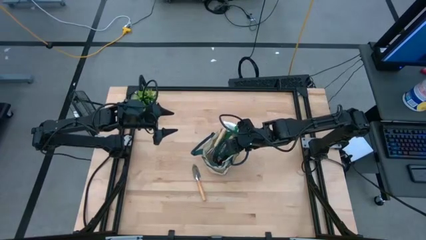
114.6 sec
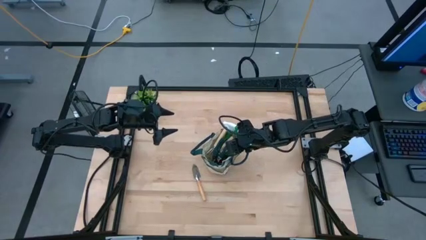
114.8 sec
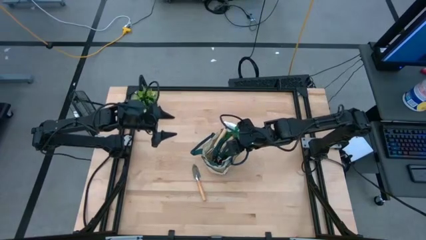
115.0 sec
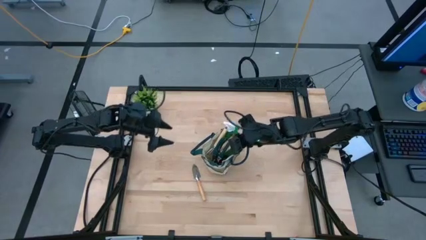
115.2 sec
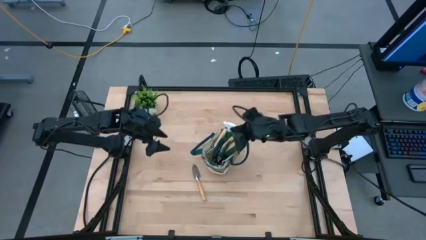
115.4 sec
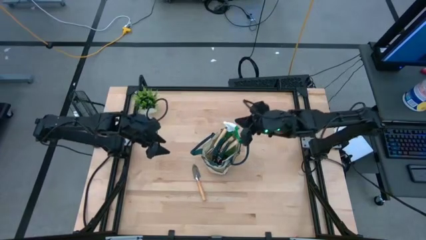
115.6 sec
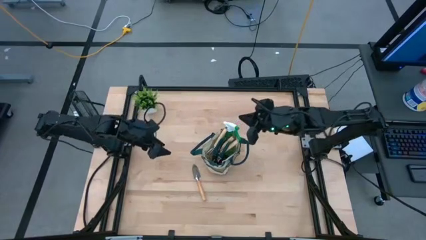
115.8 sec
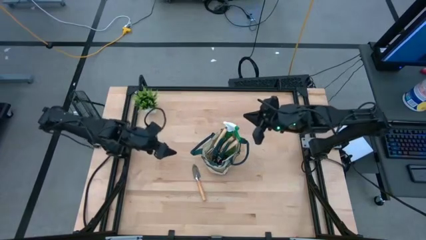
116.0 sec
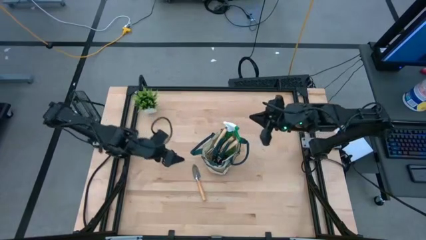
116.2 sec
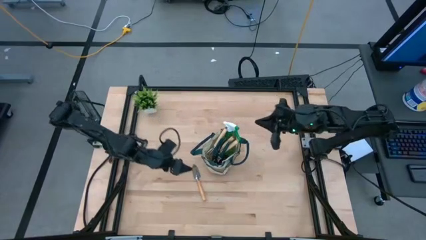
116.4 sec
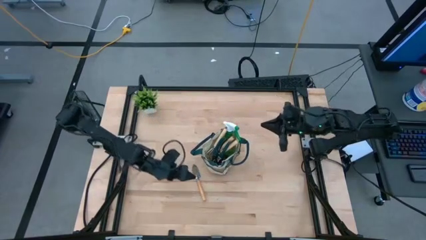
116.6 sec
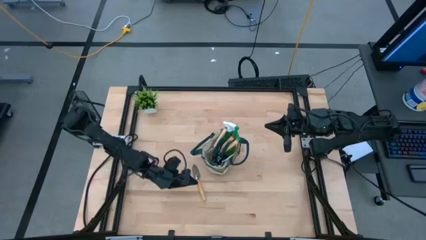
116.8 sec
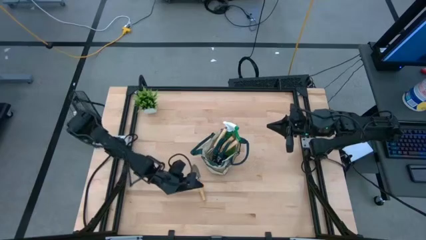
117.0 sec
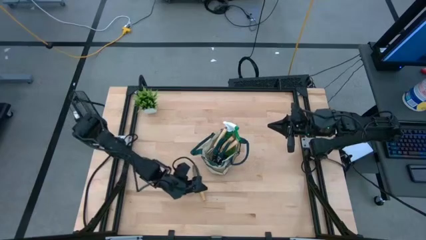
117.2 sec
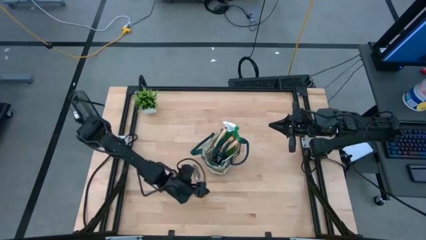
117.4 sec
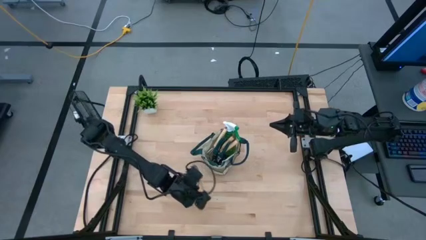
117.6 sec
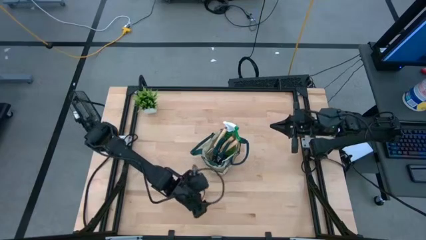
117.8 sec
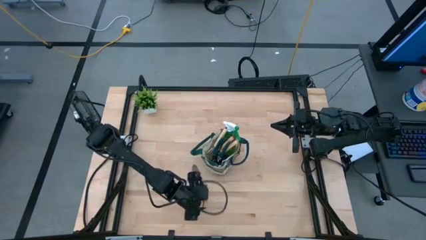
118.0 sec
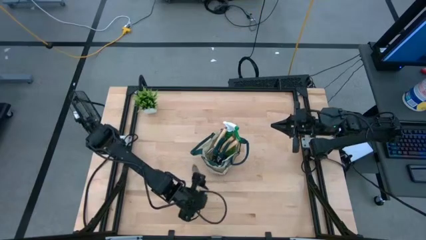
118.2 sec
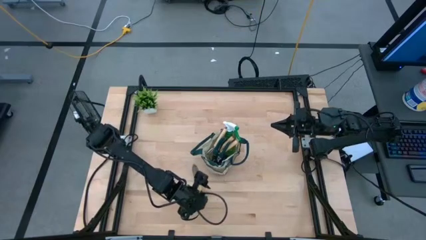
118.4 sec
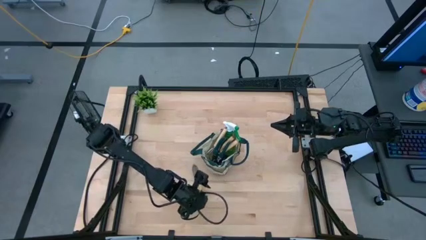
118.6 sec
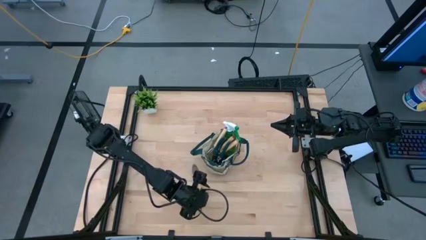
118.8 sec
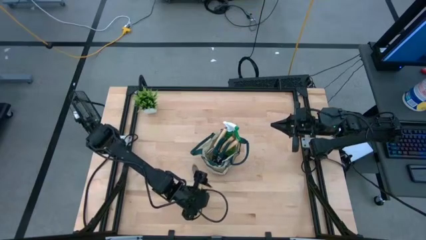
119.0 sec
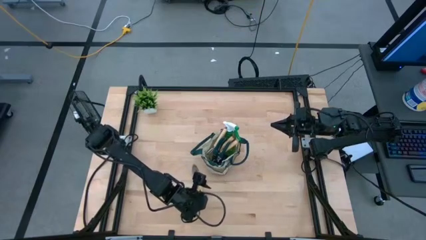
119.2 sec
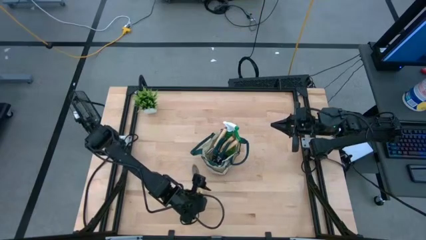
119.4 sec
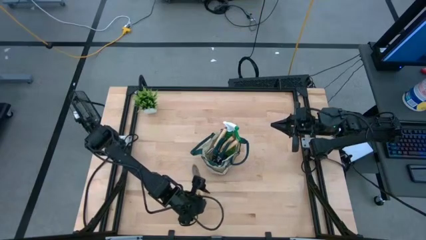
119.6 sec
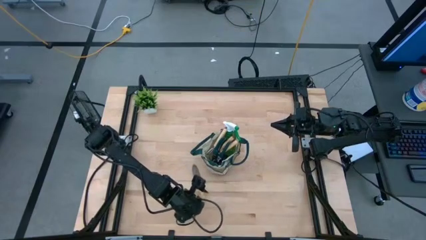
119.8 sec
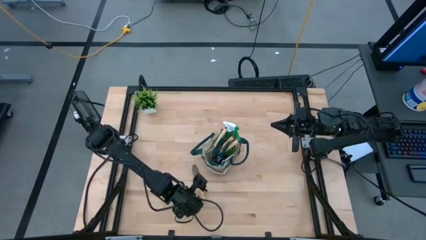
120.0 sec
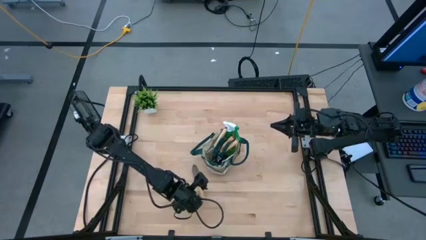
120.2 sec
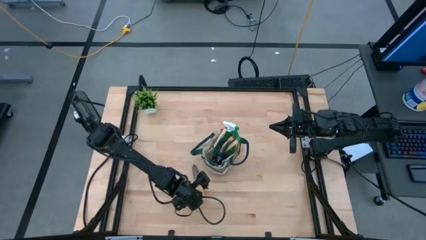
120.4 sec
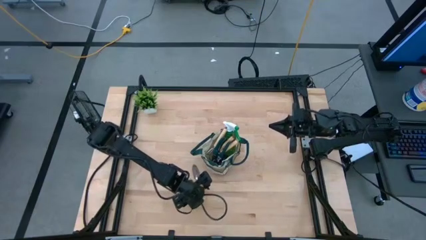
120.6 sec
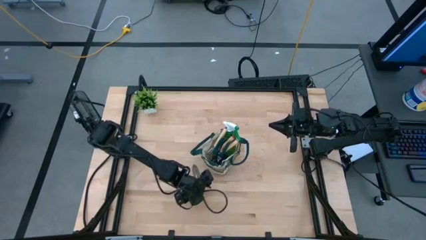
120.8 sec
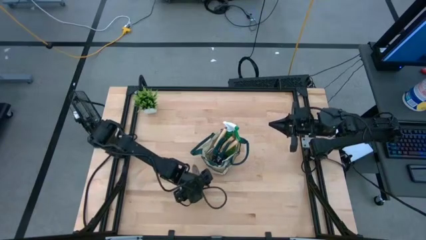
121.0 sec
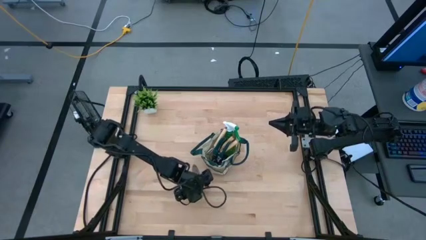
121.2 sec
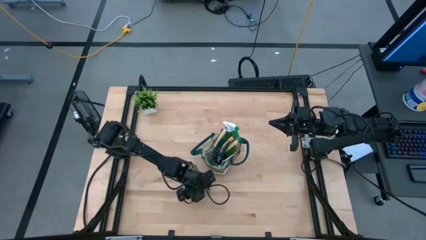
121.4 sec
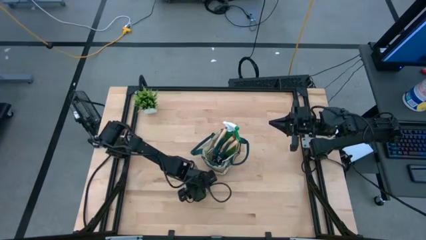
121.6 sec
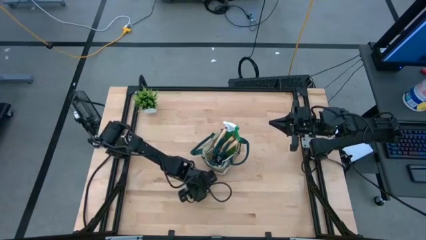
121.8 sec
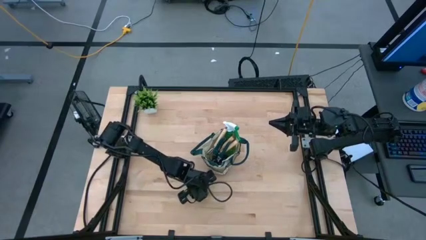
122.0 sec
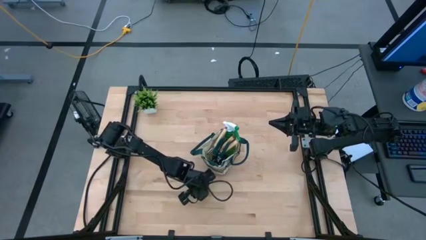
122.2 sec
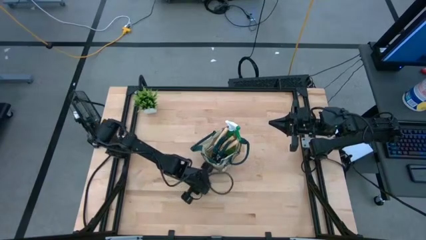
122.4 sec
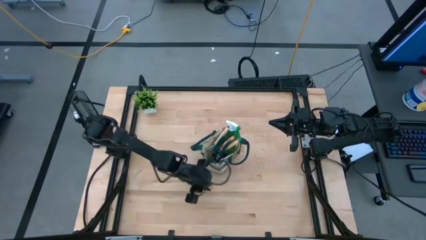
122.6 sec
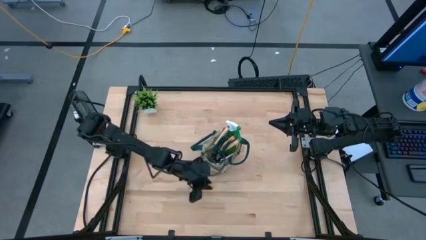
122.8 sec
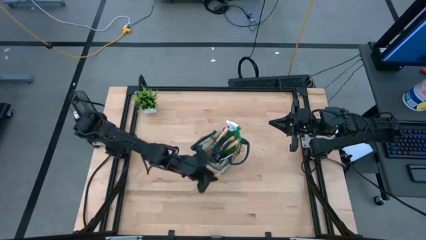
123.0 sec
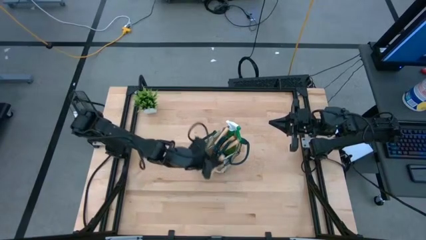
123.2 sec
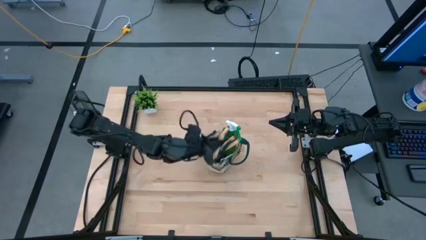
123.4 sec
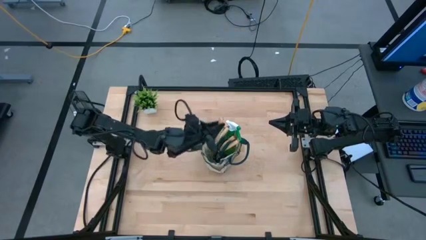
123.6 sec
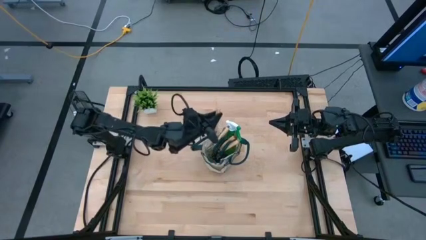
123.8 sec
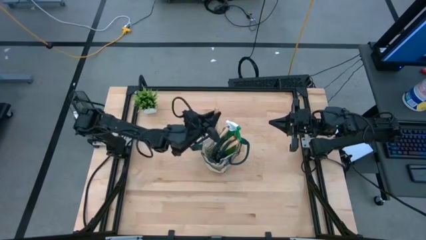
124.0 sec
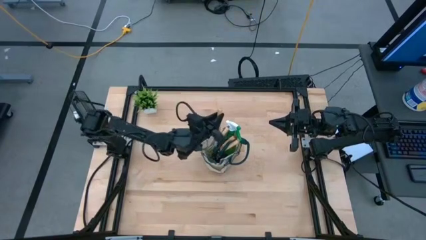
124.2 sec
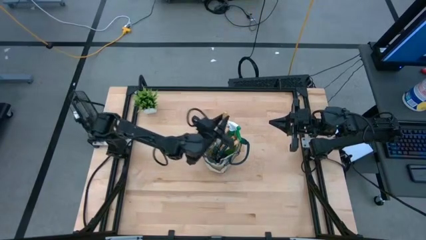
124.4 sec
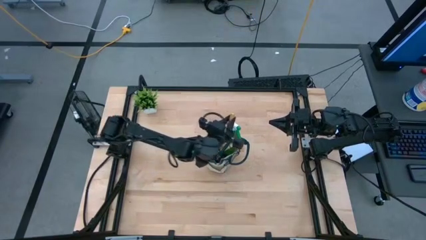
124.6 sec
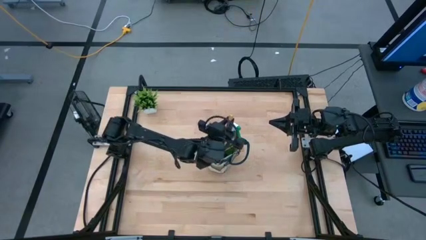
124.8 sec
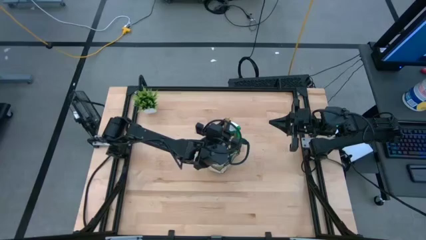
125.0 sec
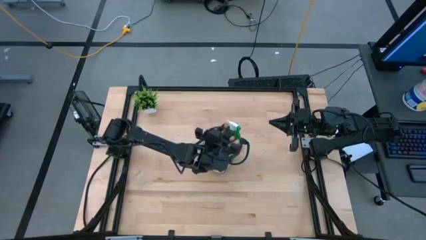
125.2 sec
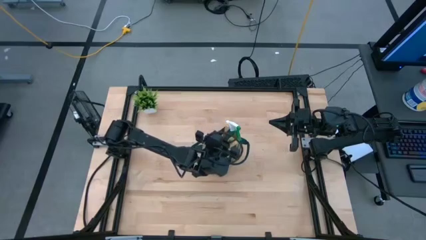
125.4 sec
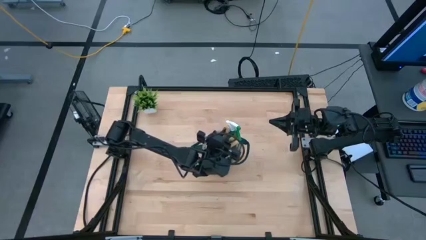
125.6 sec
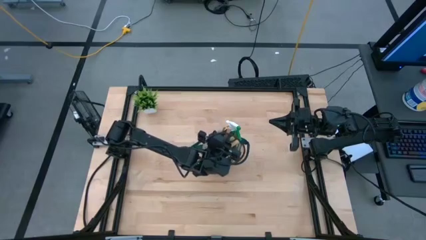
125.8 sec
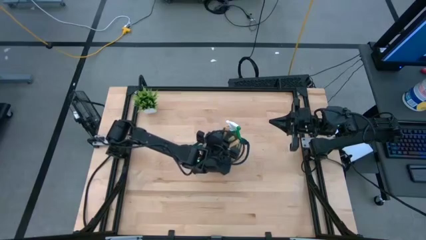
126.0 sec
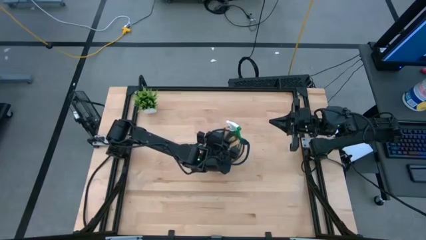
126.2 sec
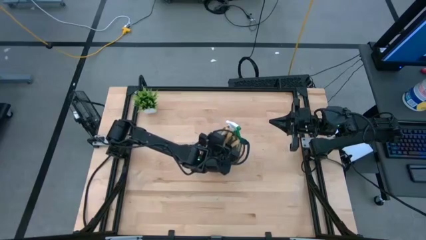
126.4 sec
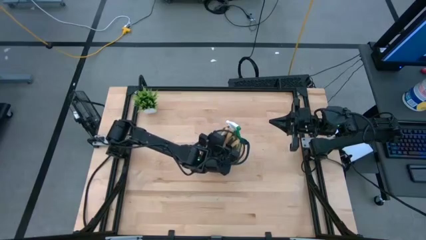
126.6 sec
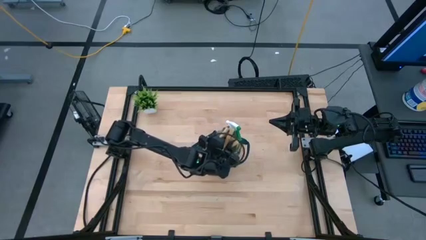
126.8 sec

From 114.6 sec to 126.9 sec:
Task: Pick & Place Garden tools in Gardening bag
Put the brown trowel into the gardening bag

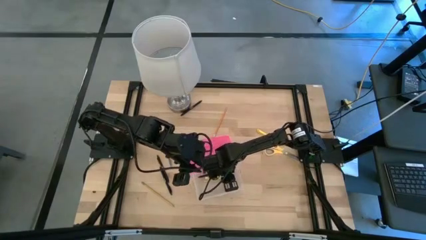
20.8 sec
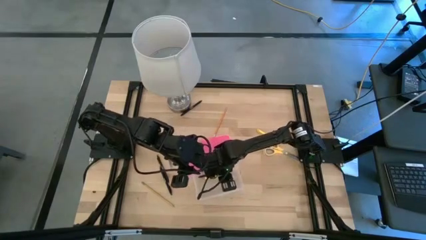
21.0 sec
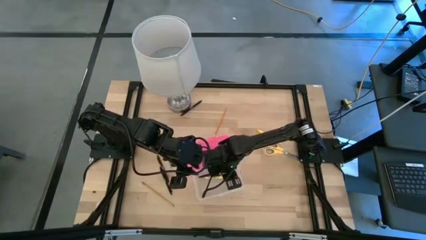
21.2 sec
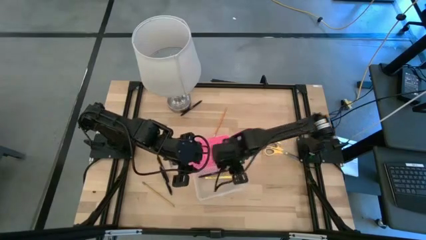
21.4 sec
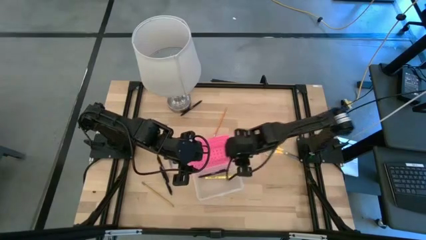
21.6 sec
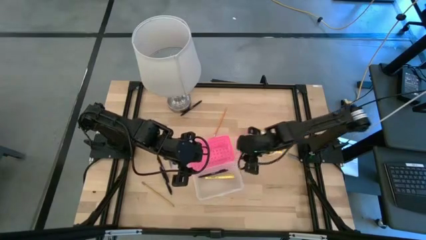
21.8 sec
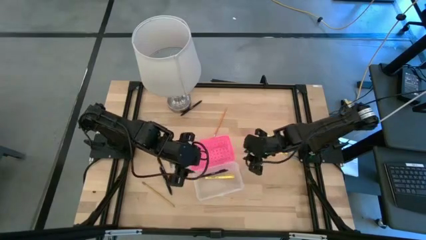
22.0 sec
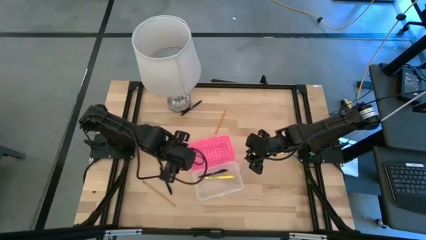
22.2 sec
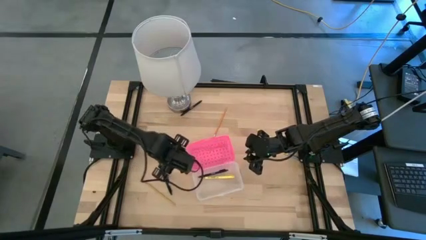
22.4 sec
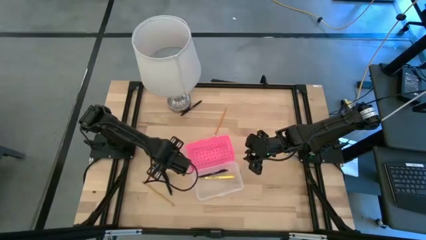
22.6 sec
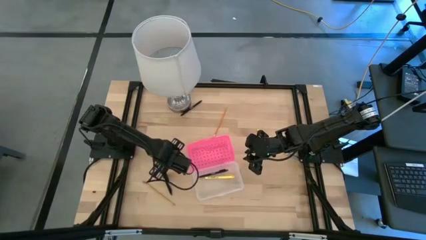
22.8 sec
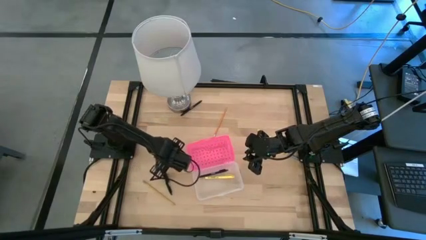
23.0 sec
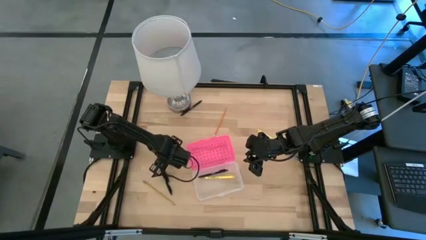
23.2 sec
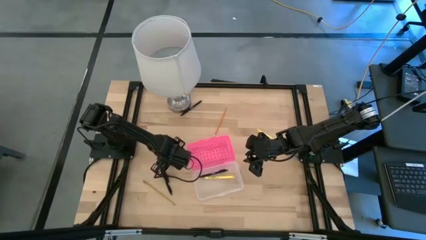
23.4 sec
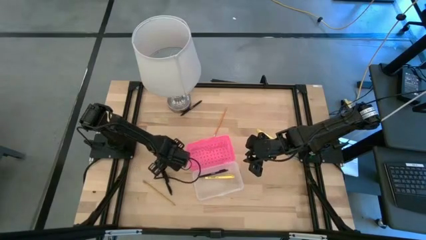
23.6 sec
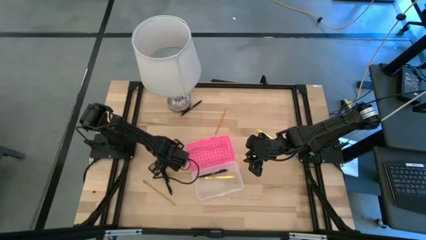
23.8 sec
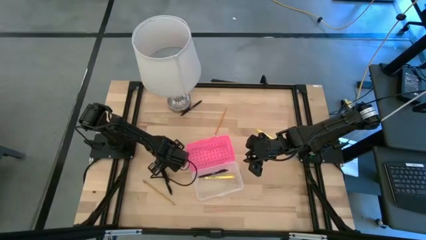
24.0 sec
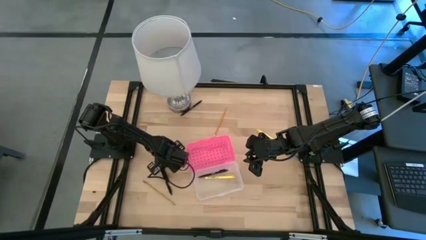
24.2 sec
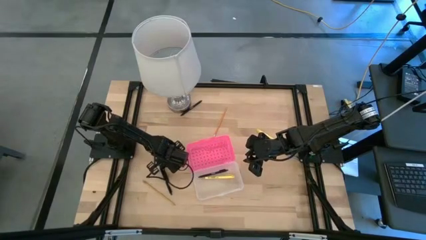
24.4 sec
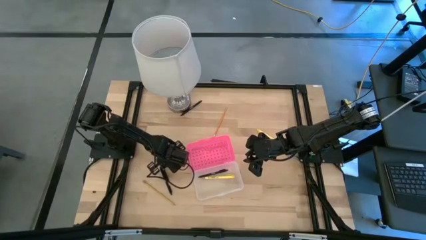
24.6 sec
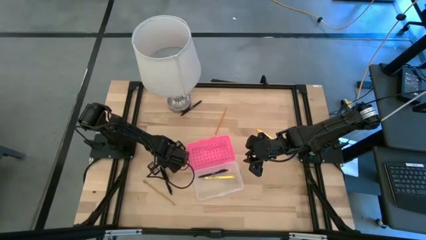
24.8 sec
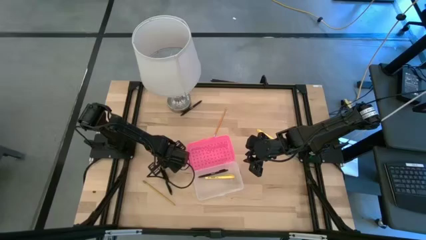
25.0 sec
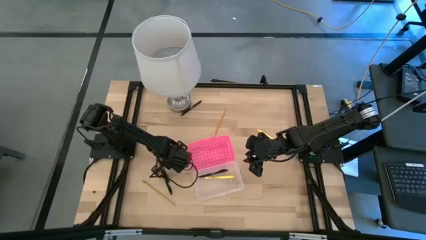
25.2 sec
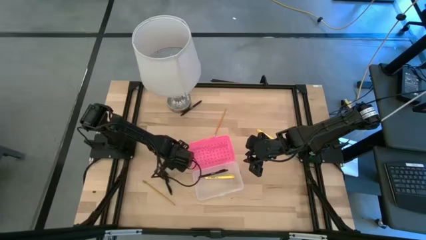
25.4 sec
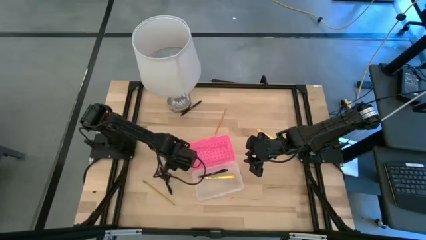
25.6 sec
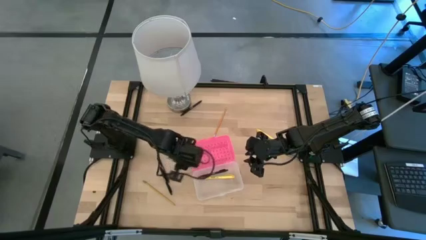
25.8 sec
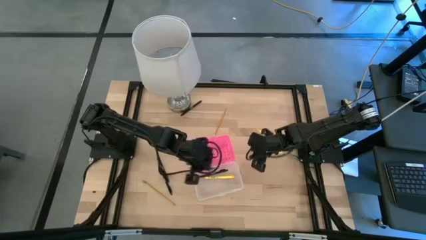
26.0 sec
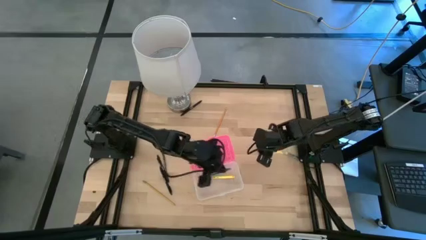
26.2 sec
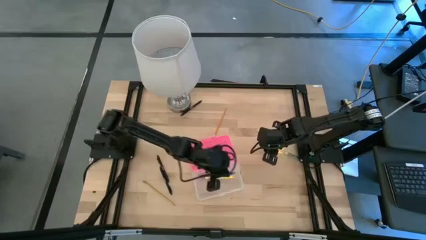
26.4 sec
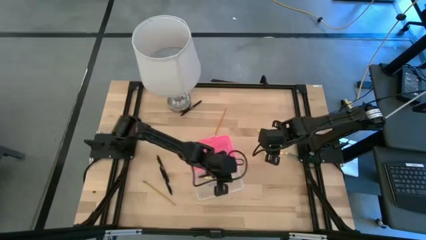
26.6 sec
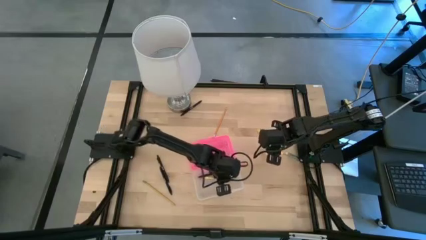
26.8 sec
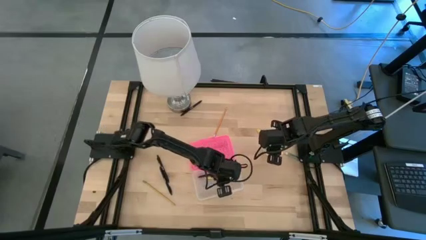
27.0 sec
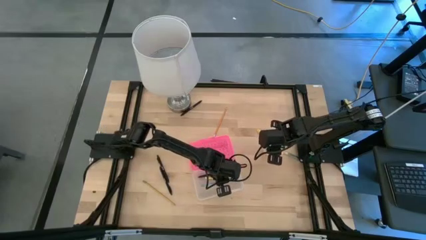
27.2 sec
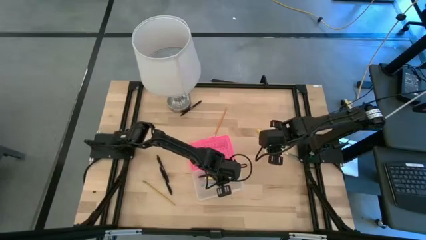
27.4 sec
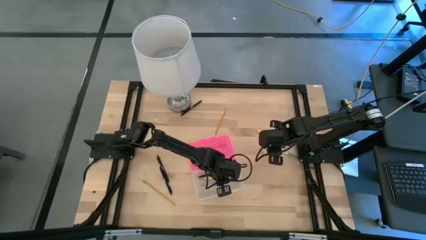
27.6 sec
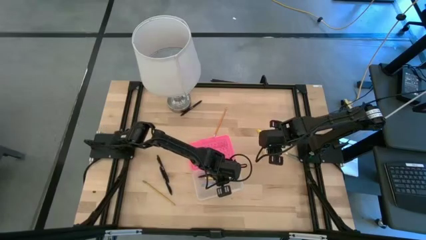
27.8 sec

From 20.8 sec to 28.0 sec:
Task: Pick & place school supplies into a supply box
Put the blue pen into the transparent supply box
